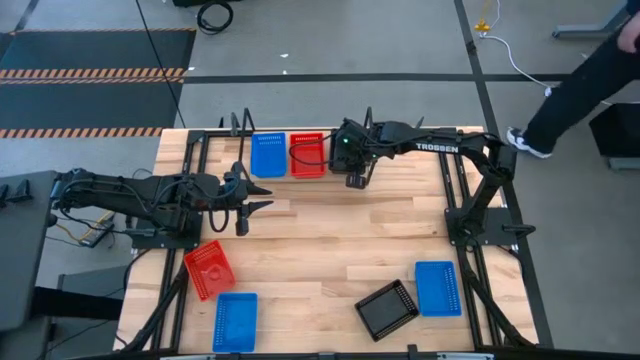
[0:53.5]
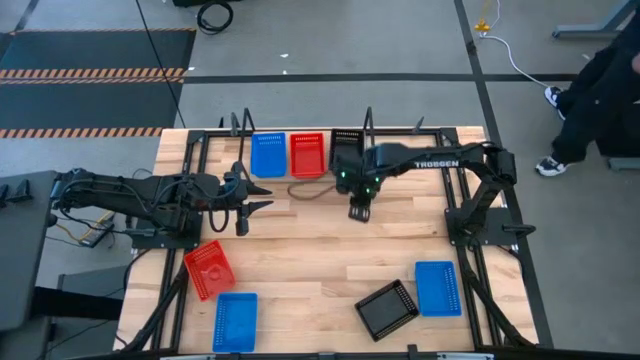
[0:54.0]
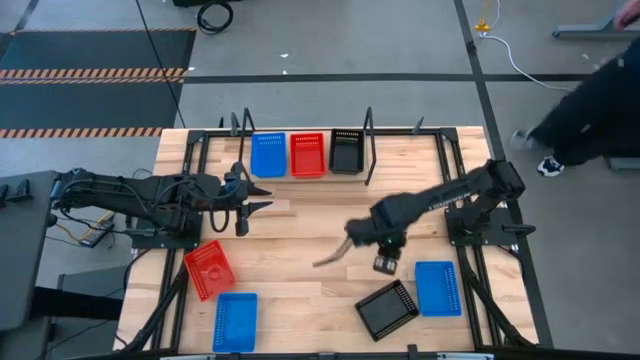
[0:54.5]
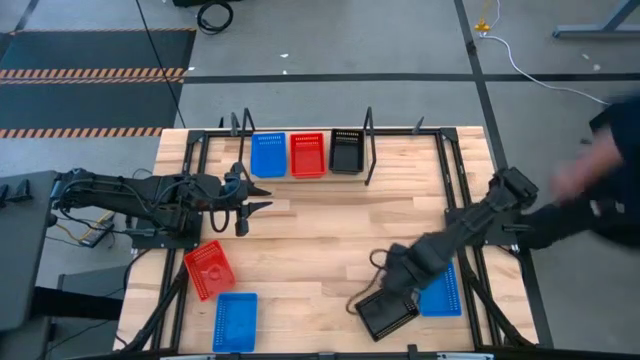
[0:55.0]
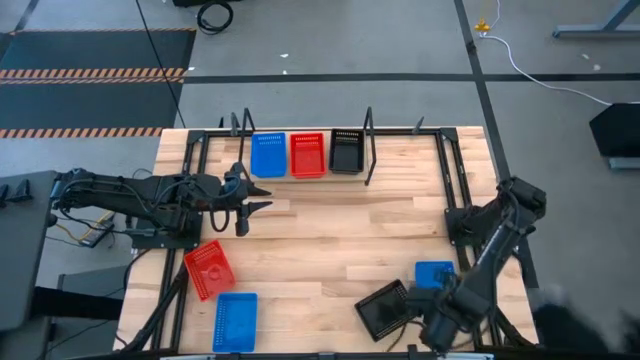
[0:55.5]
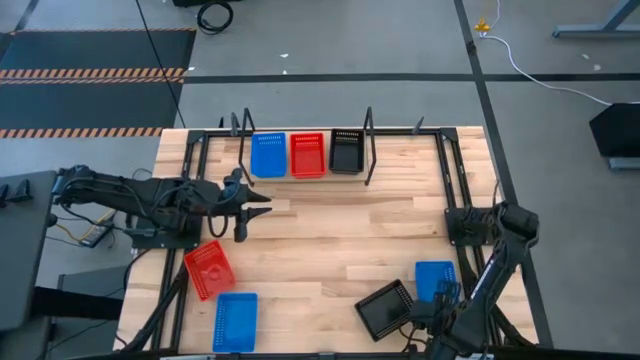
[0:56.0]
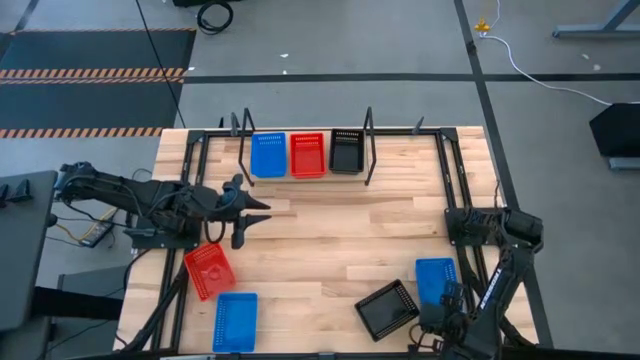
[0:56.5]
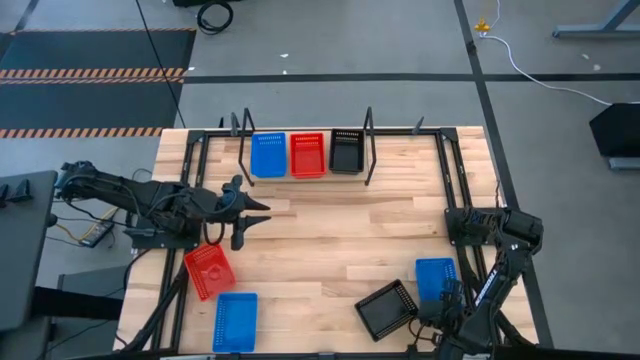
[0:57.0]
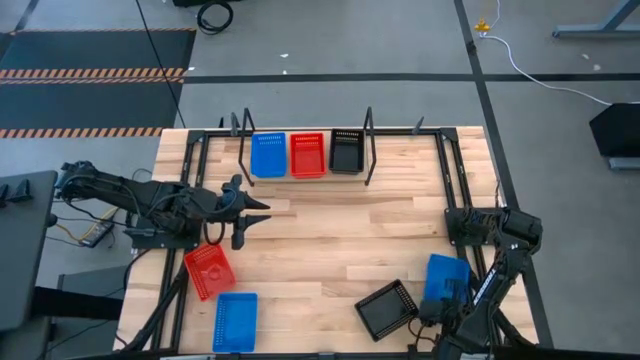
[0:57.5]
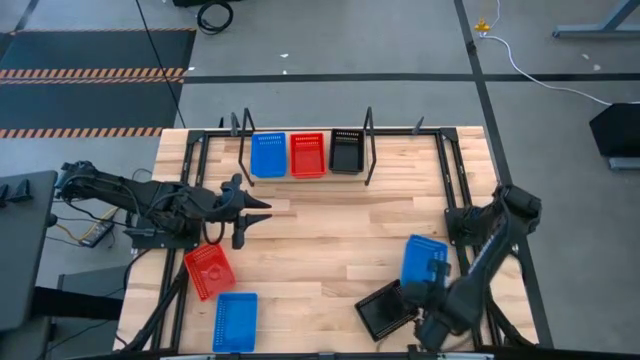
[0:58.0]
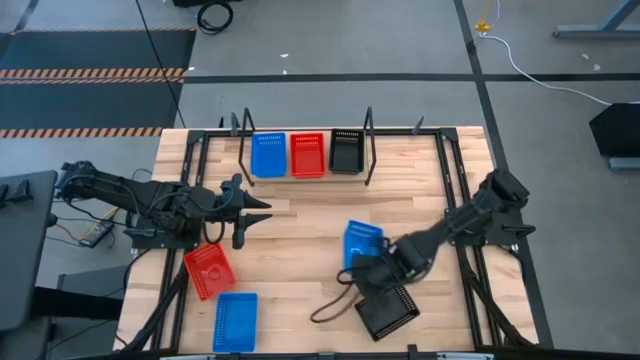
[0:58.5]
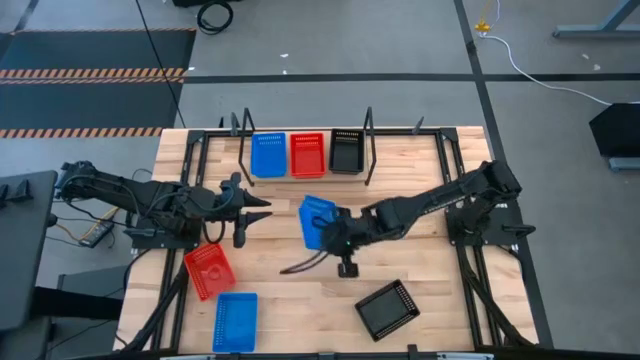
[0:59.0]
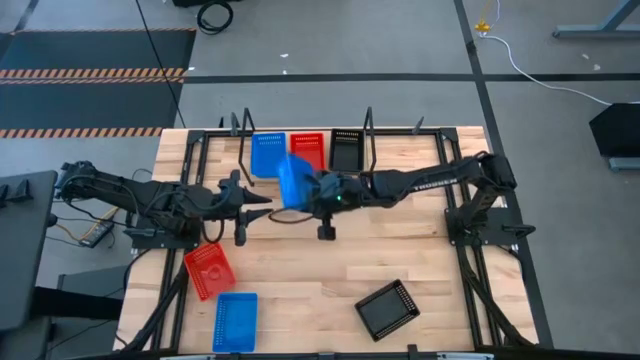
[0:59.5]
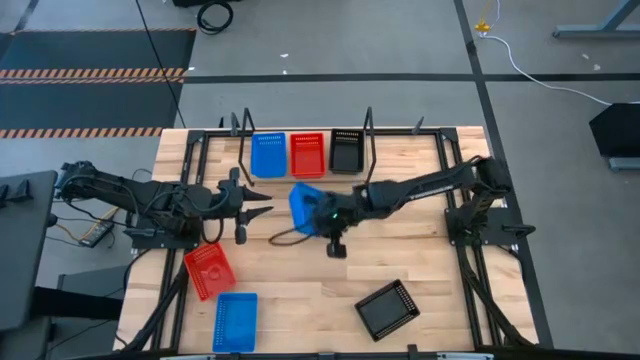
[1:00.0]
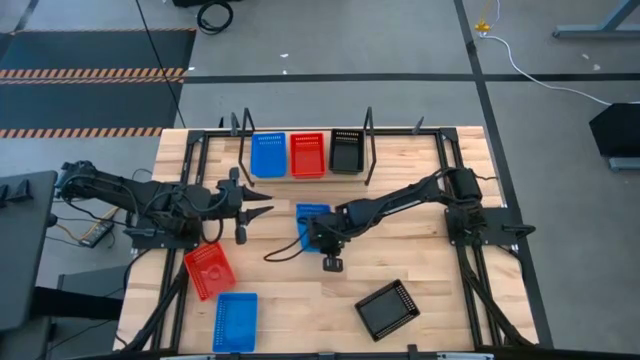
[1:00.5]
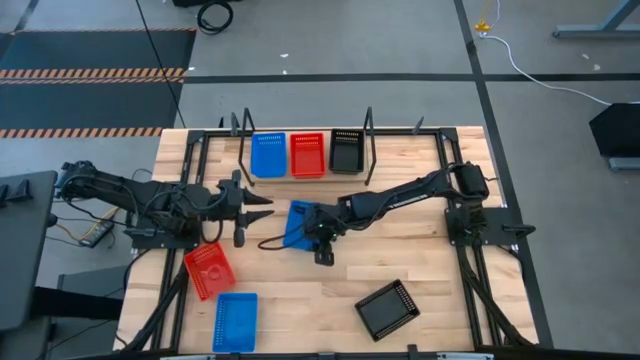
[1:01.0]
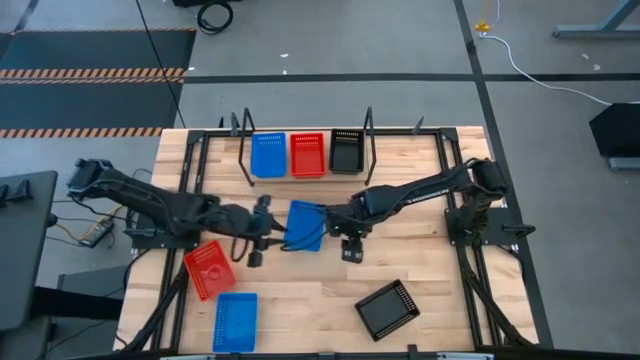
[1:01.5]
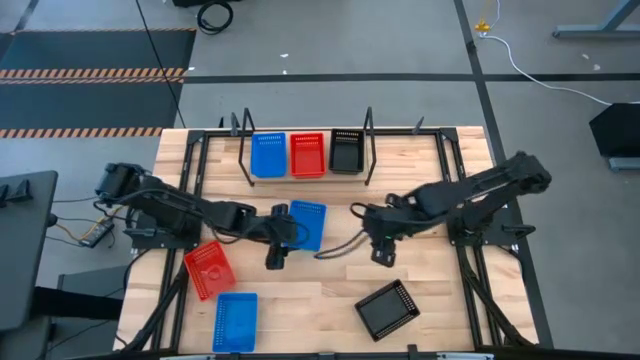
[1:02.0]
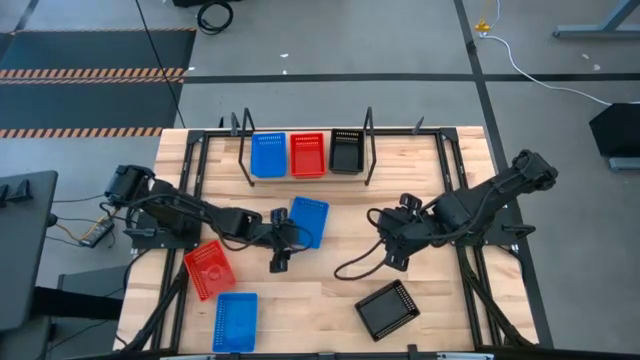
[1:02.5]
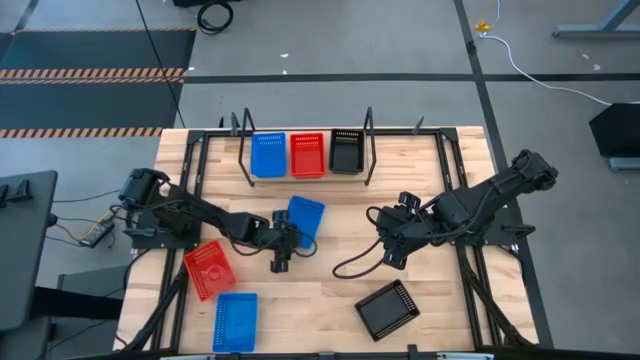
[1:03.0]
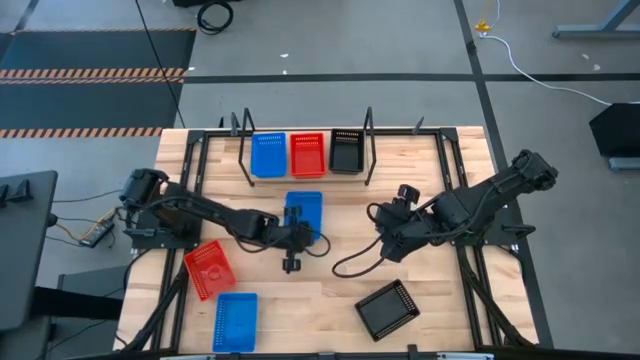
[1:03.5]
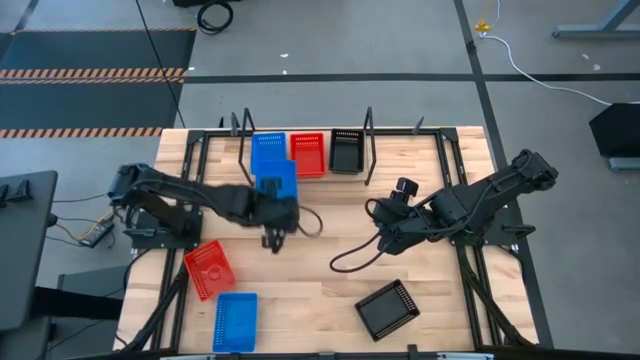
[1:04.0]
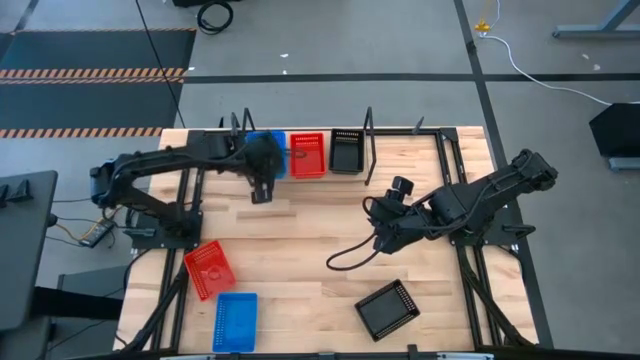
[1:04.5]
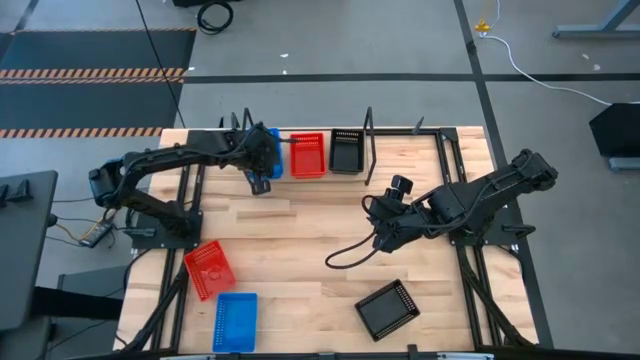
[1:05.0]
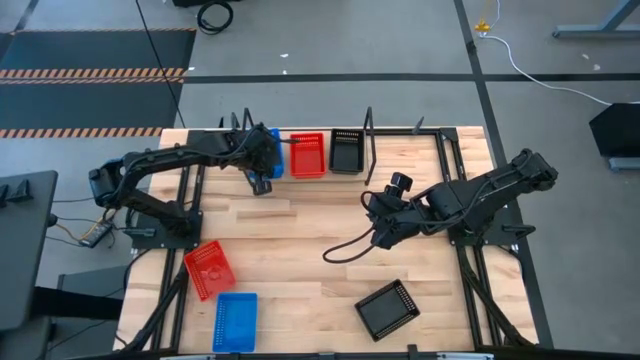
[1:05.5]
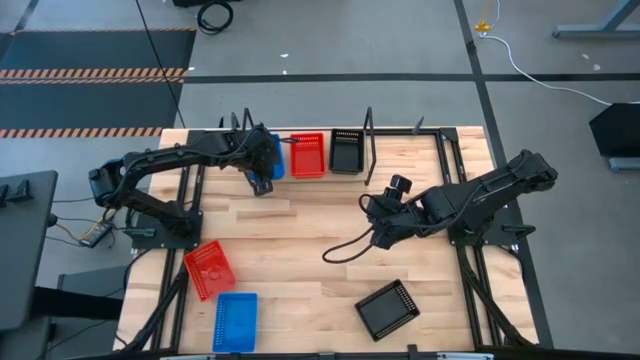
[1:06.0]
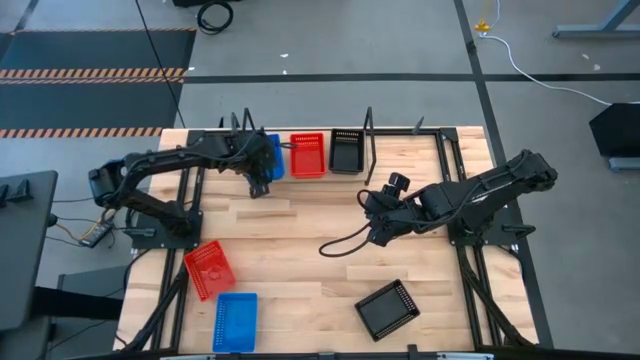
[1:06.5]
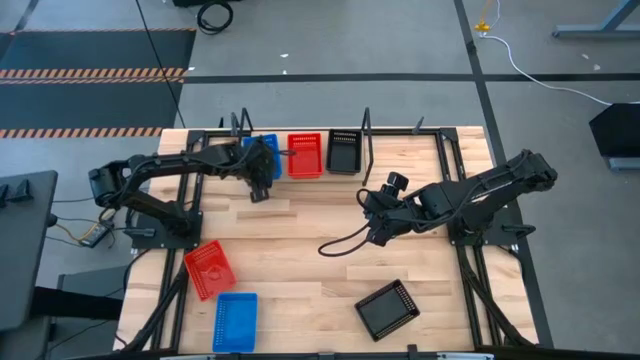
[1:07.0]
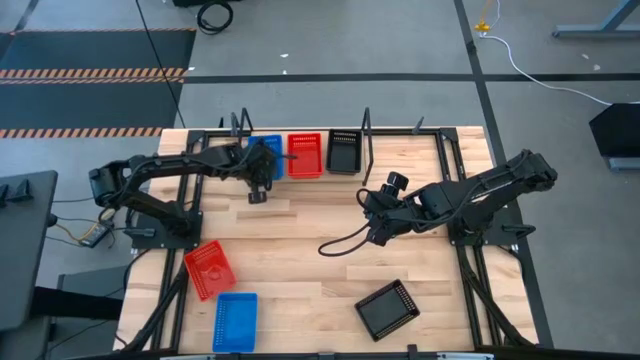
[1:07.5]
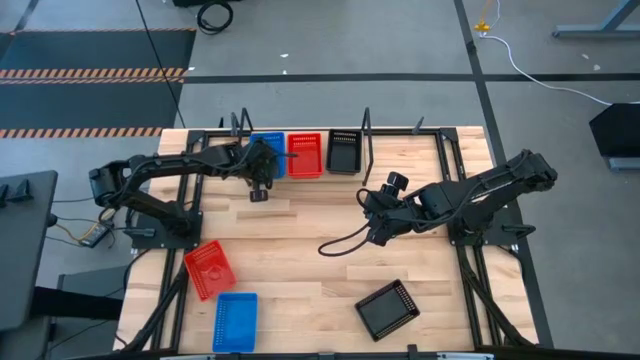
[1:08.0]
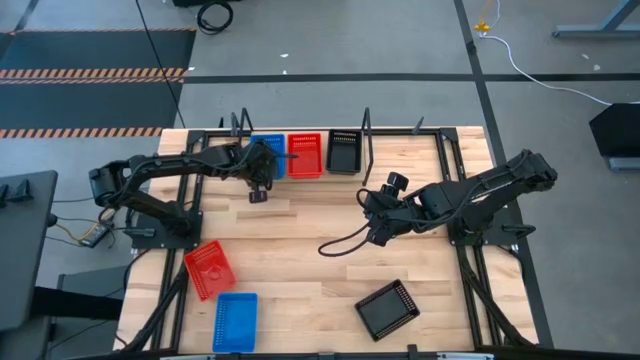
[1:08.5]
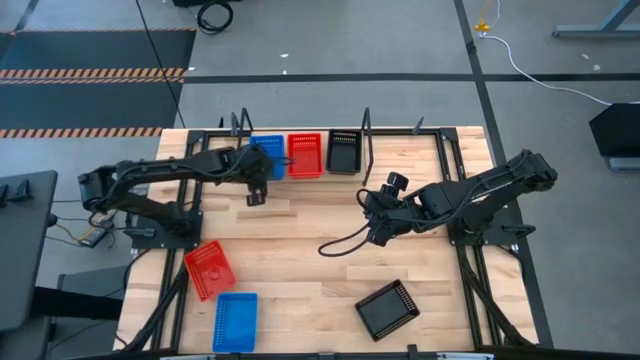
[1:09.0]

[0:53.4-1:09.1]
Task: Stack baskets on shelf by color
Stack the right blue basket on top of the blue basket on the shelf

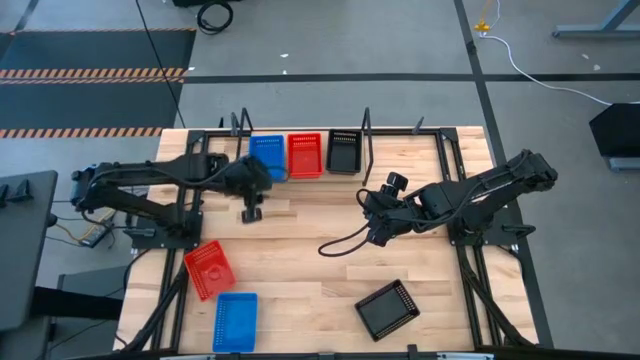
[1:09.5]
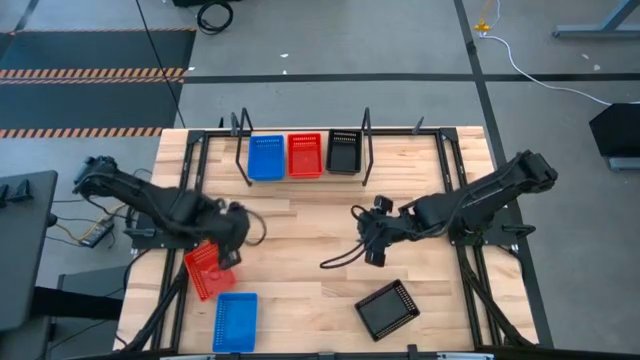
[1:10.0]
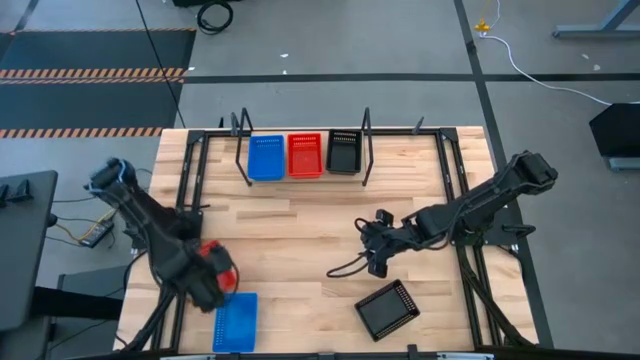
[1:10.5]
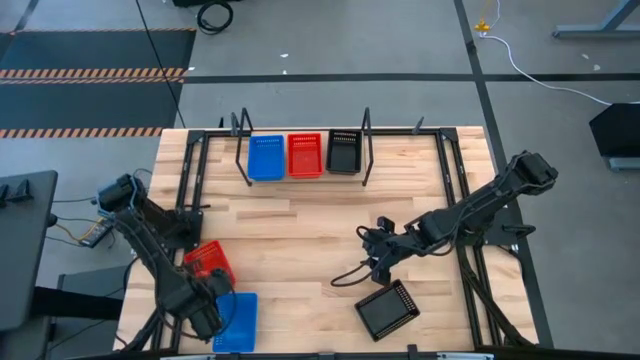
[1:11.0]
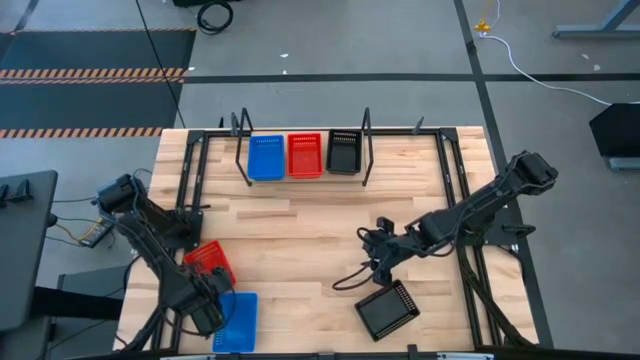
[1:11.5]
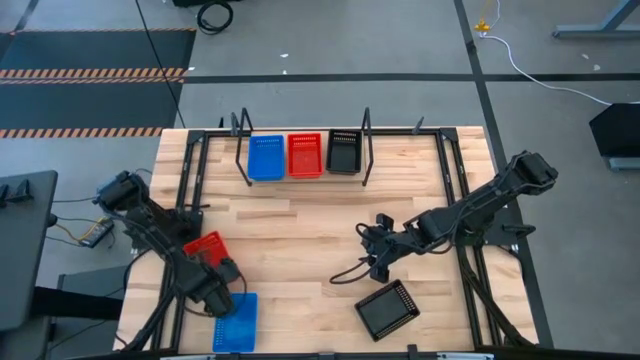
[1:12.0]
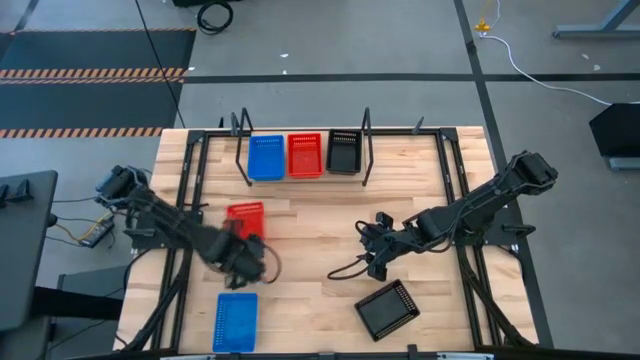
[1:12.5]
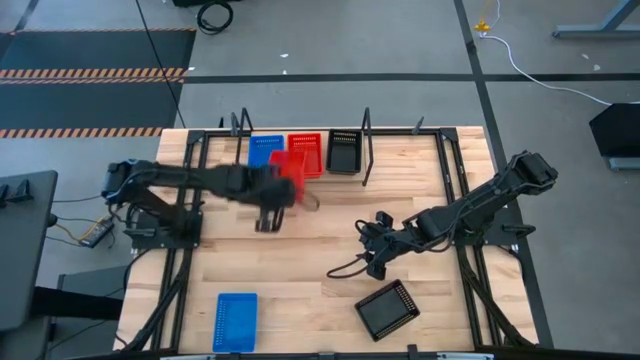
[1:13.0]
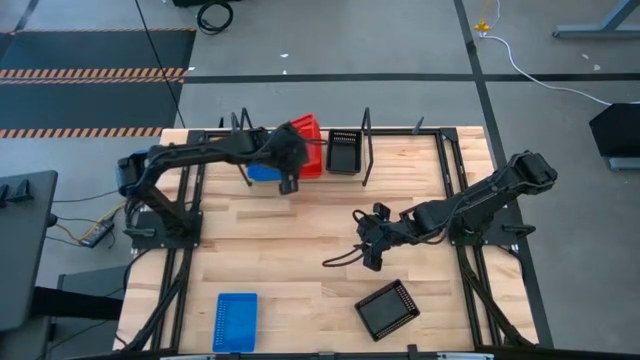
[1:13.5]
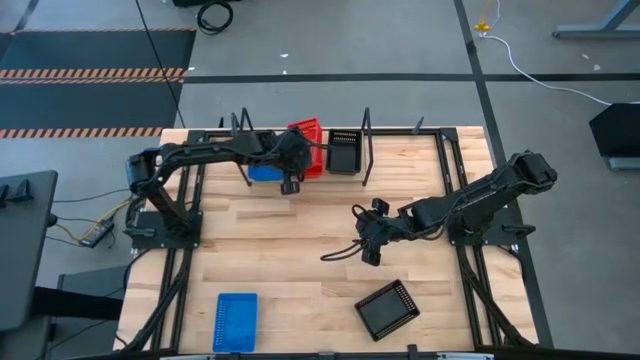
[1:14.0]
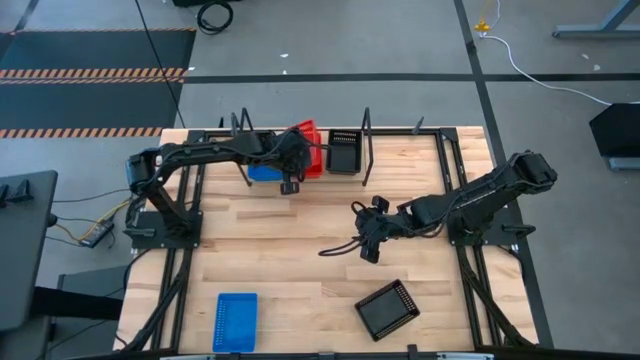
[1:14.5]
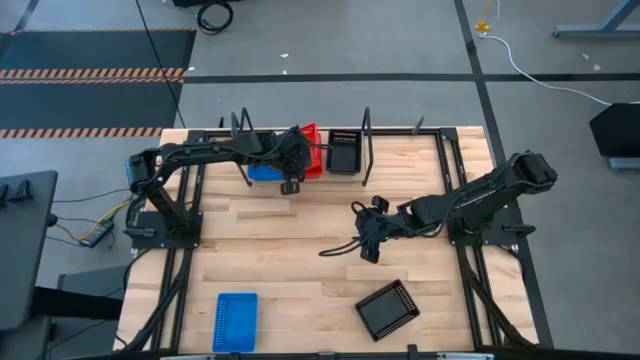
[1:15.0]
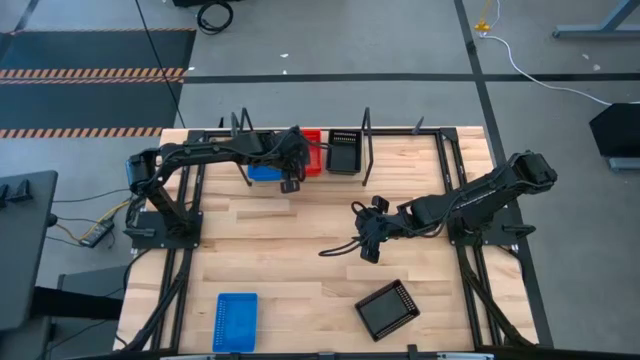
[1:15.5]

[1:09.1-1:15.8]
Stack the red basket on top of the stacked red basket on the shelf
